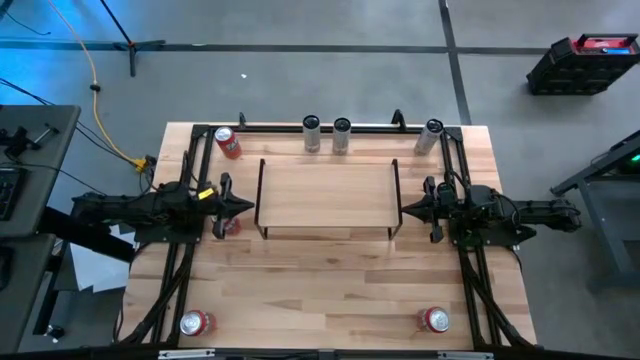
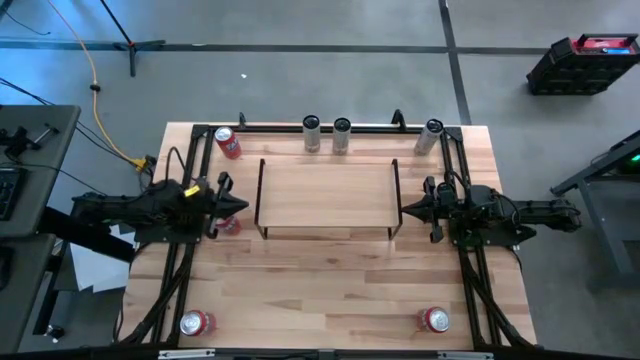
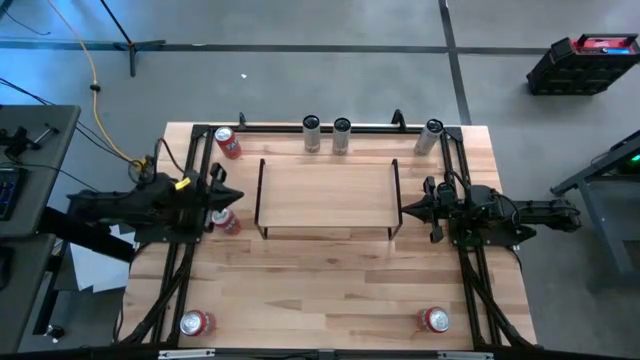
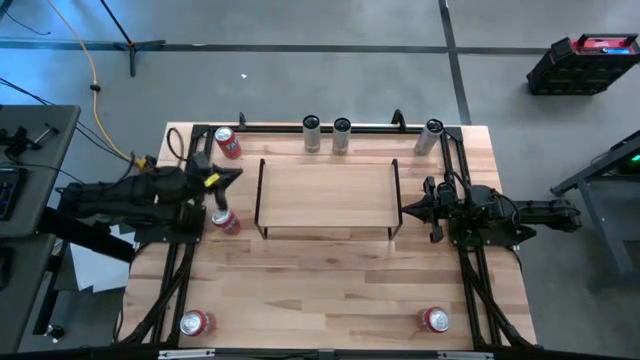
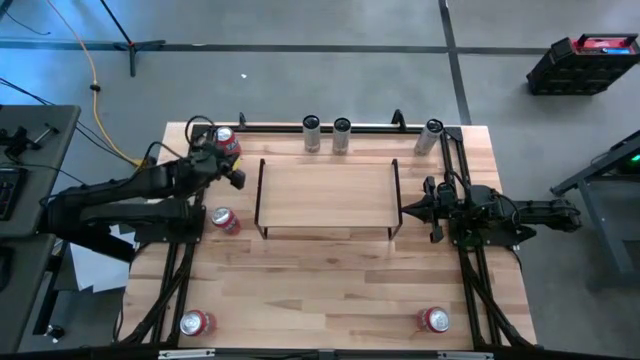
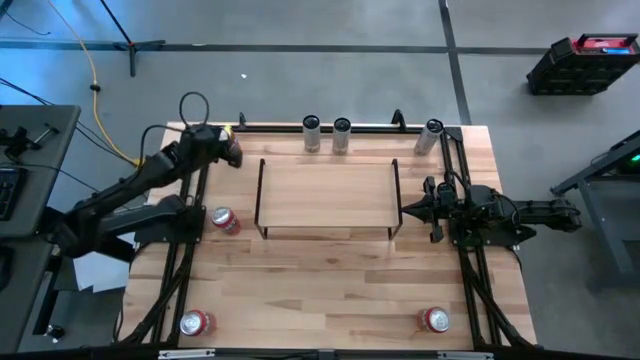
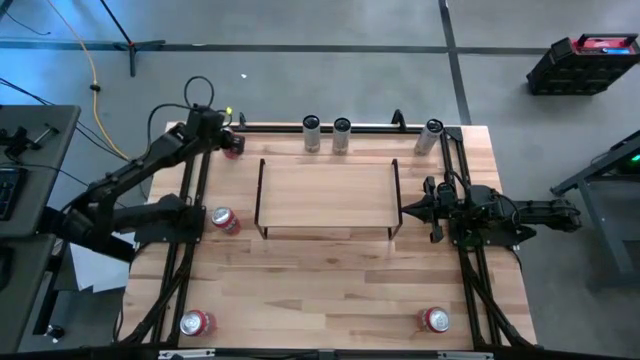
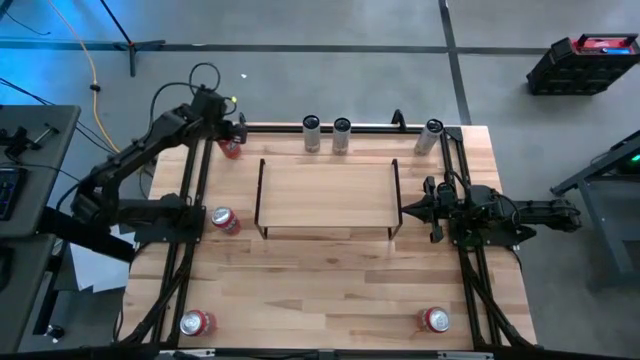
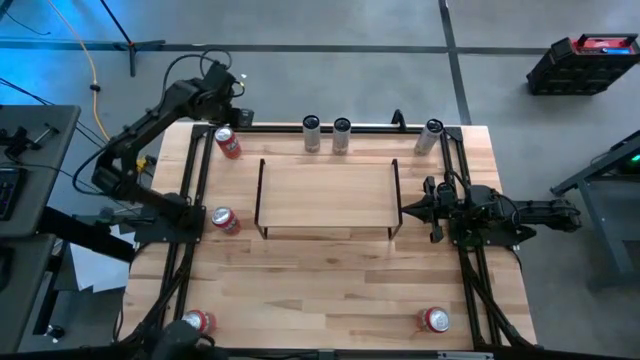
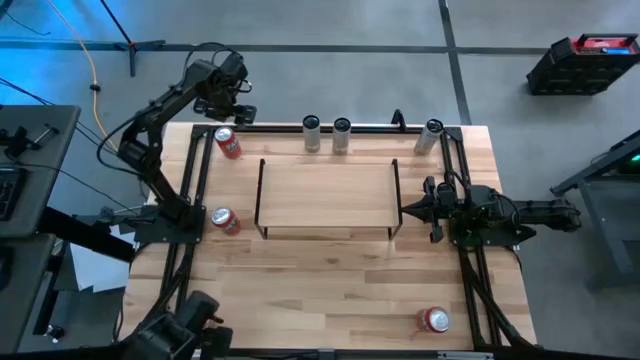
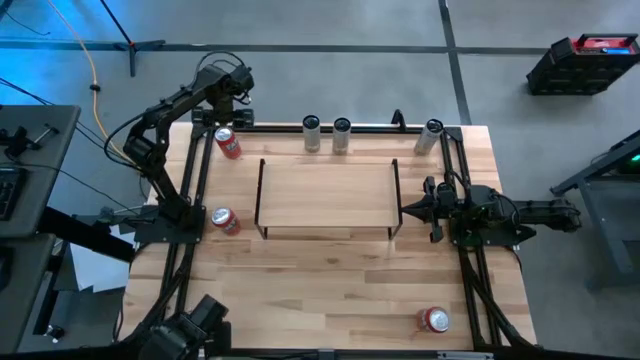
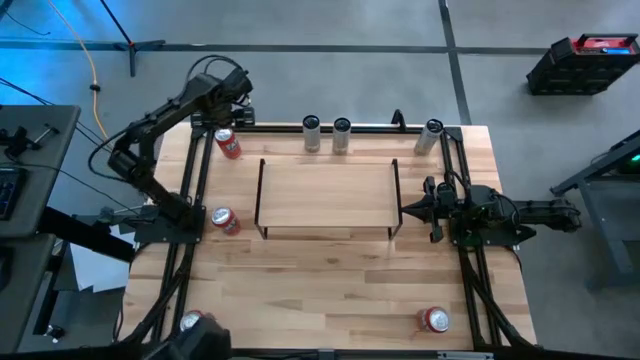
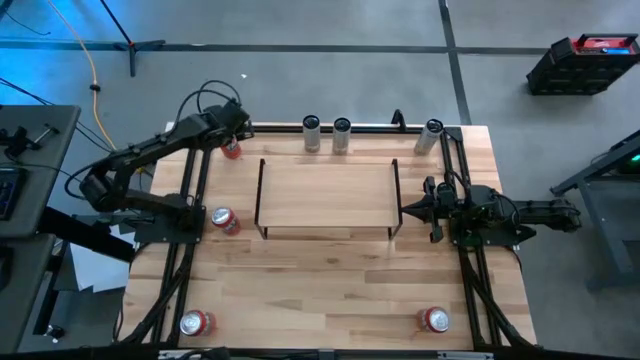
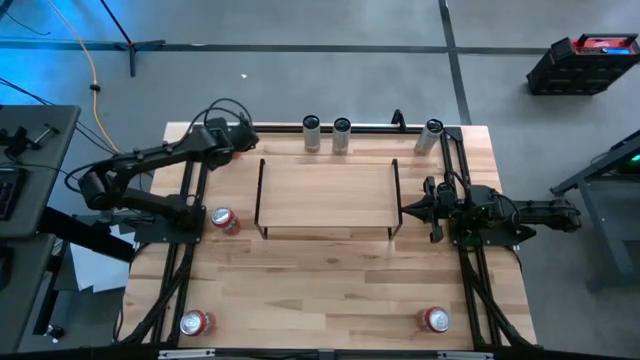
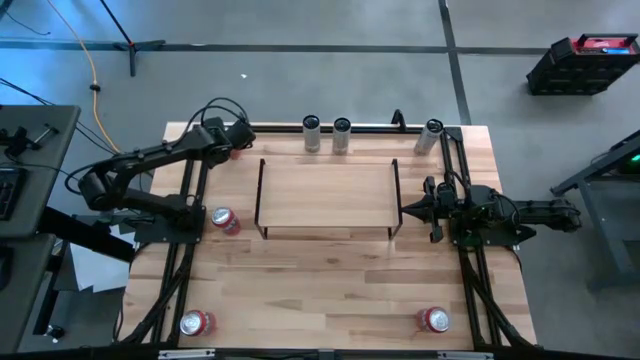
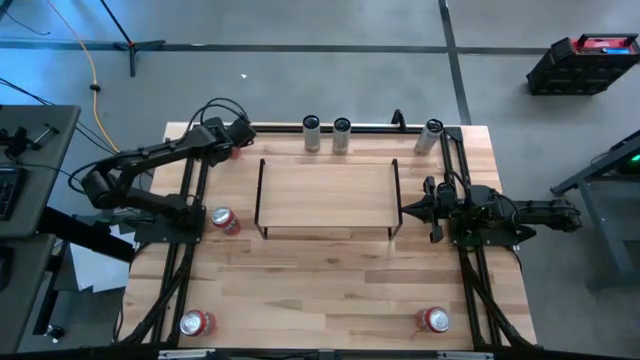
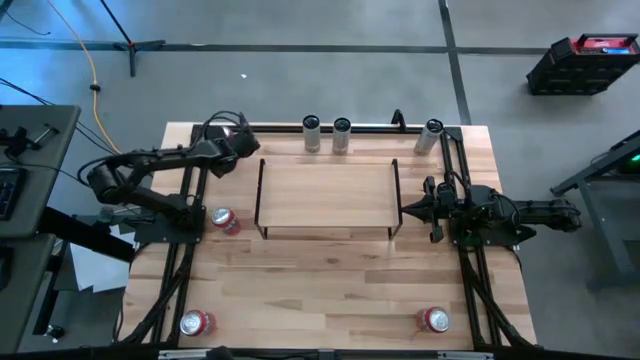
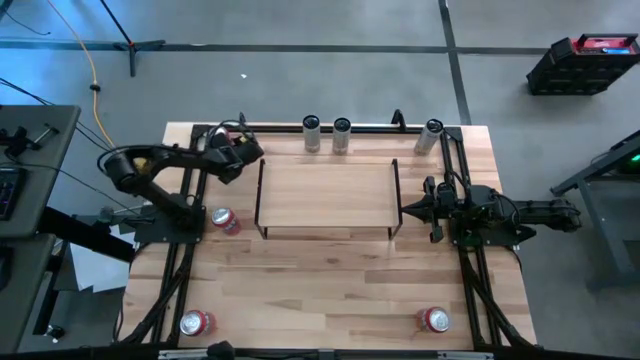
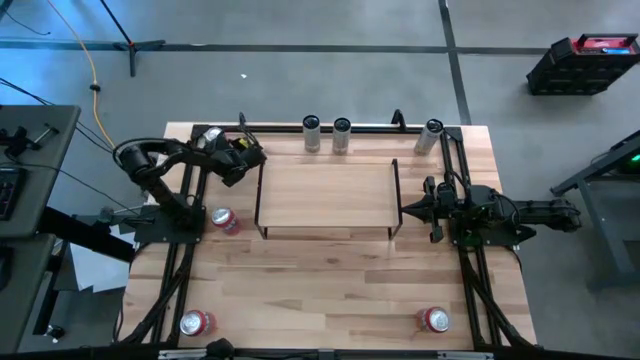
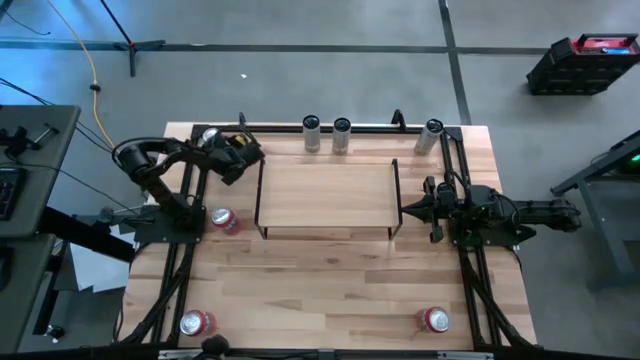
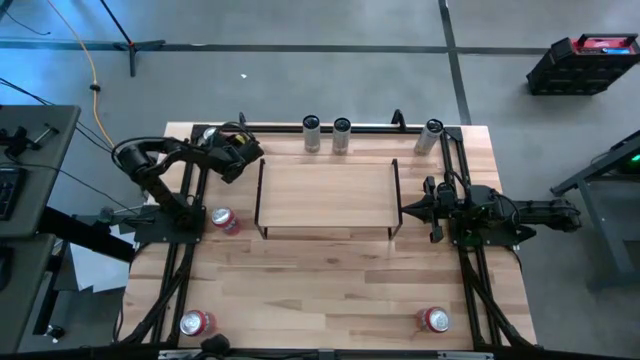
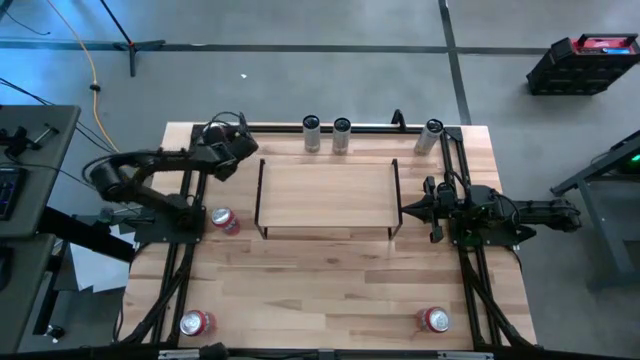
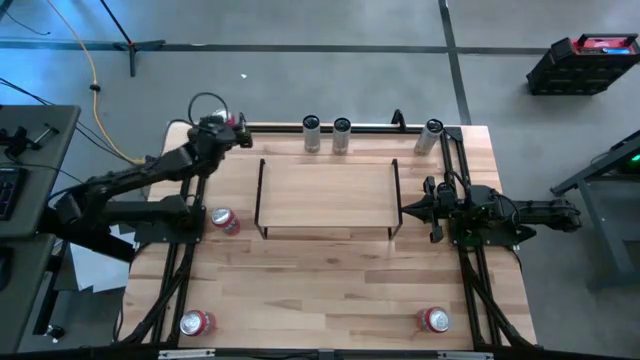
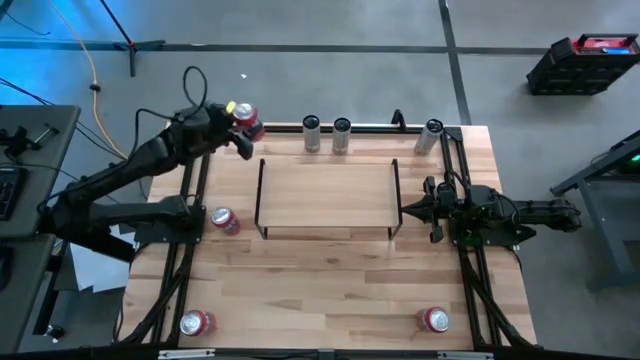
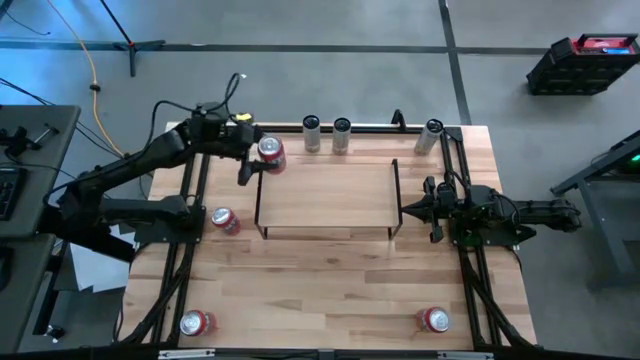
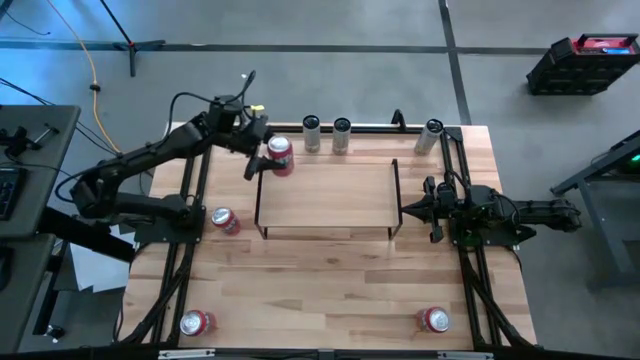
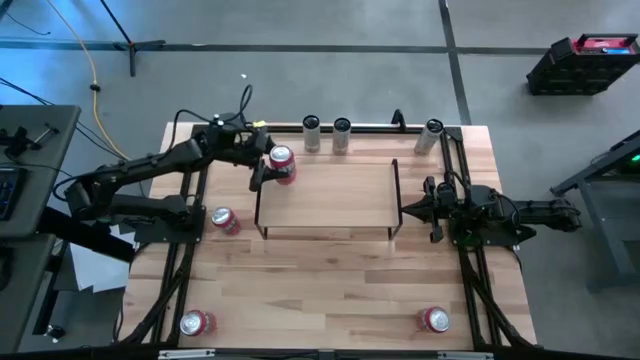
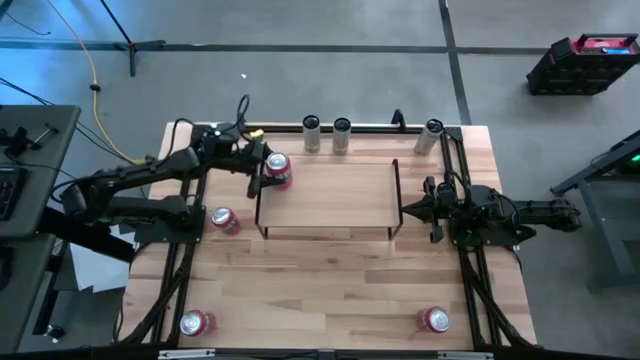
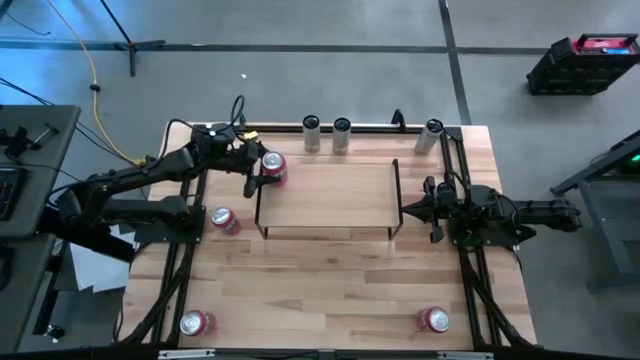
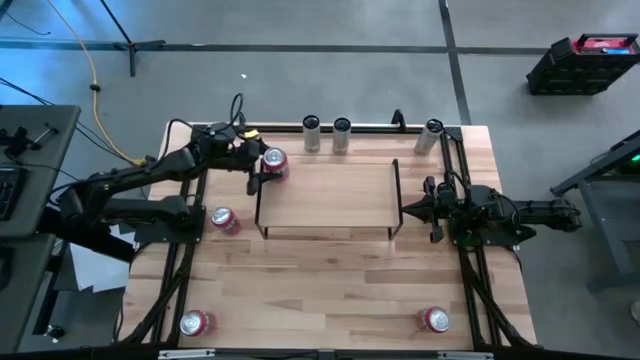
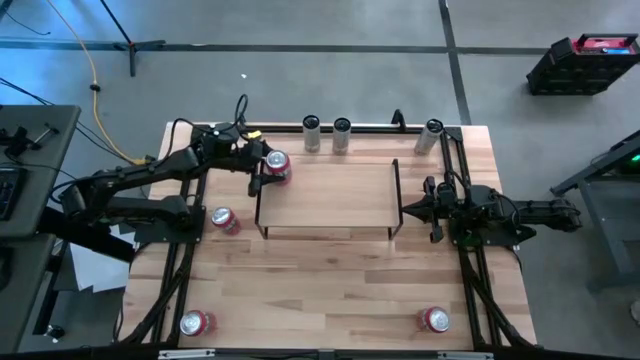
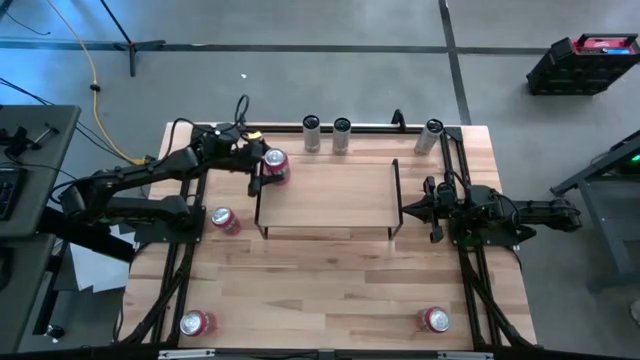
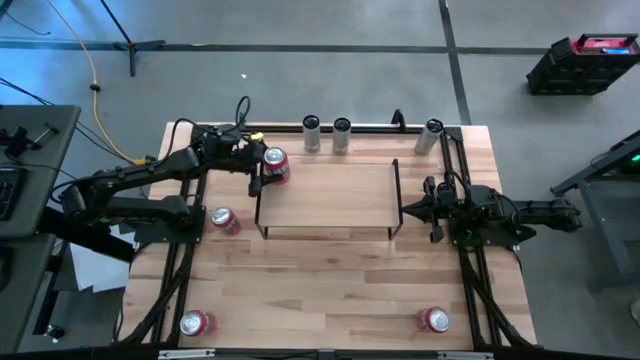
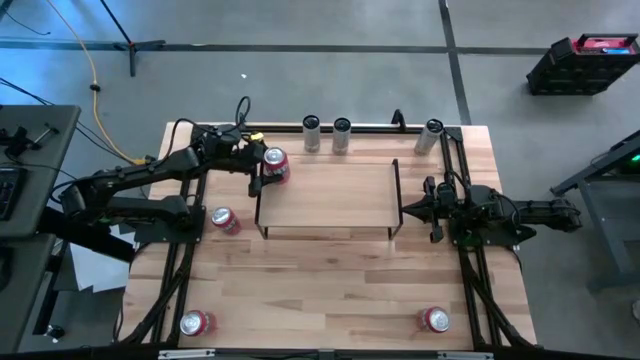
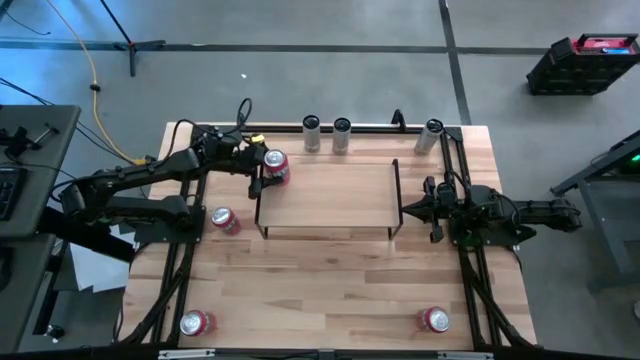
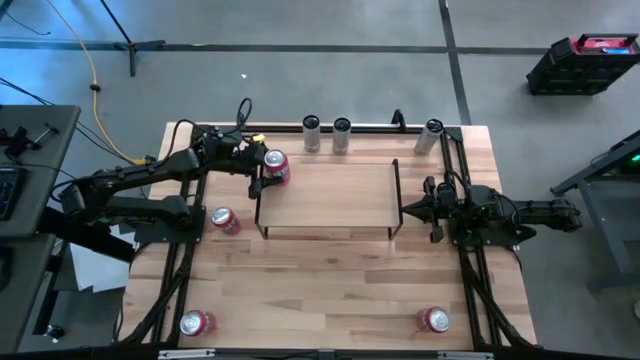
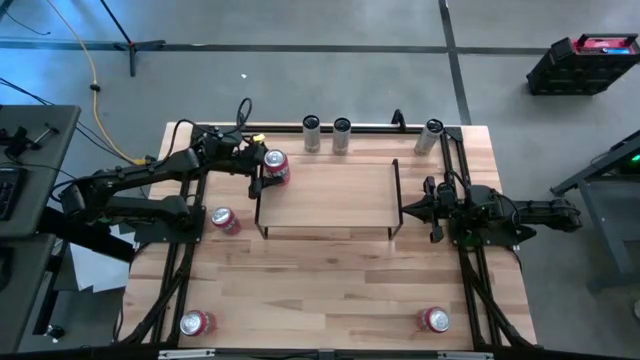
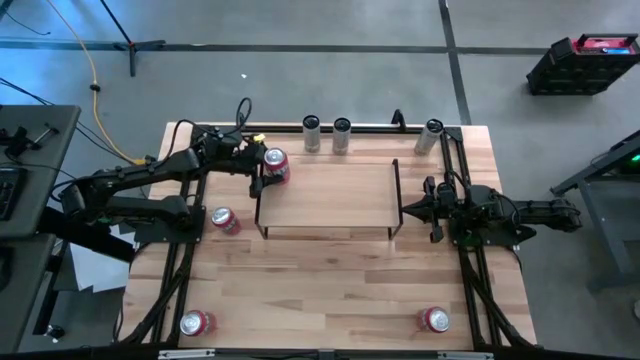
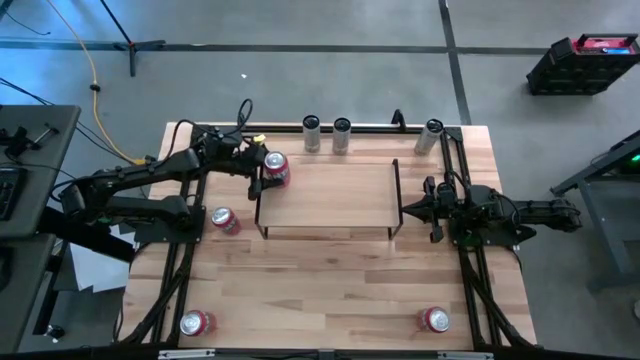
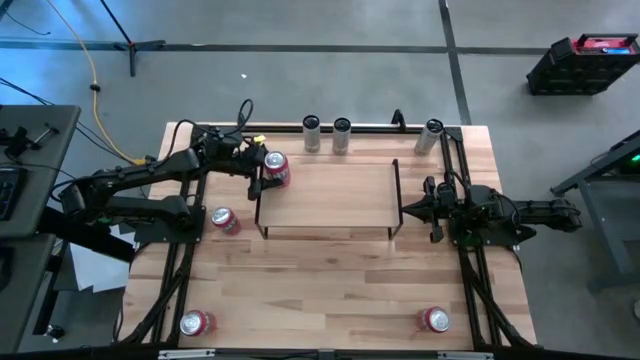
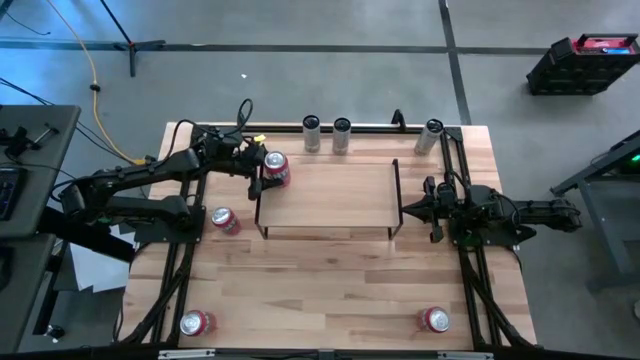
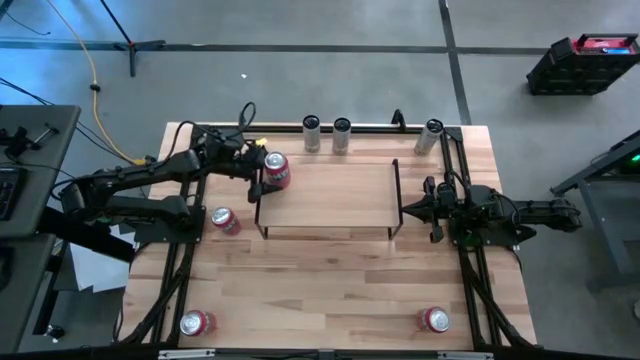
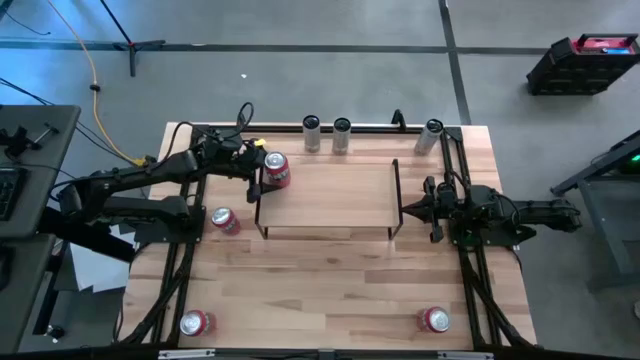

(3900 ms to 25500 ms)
Task: Place canned beverage on shelf
Put the red soda can on the shelf
